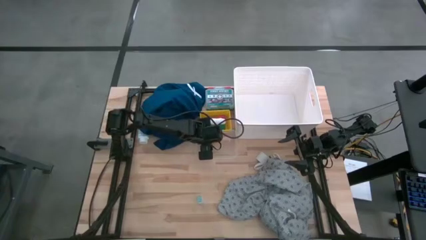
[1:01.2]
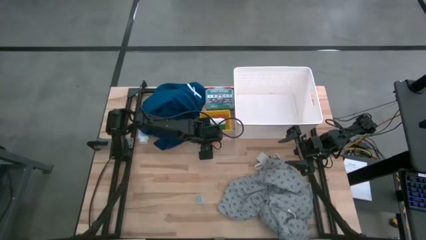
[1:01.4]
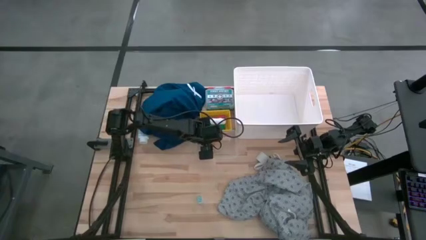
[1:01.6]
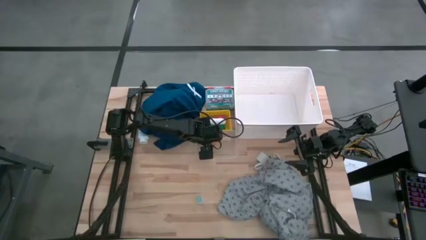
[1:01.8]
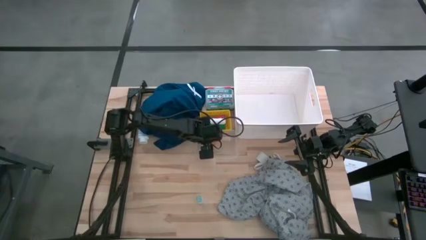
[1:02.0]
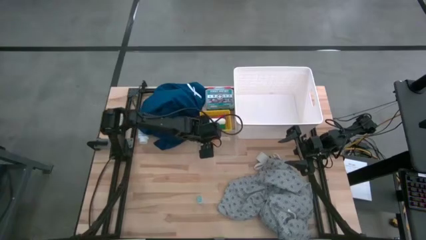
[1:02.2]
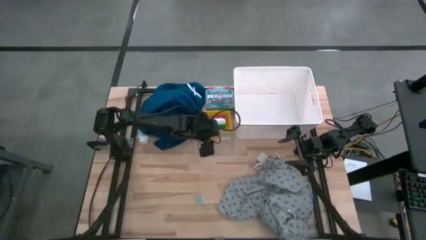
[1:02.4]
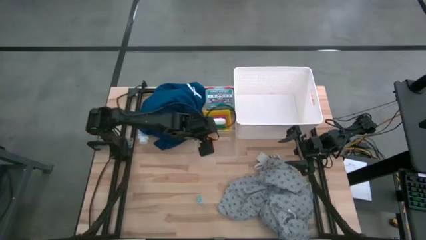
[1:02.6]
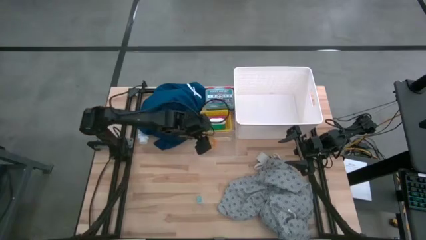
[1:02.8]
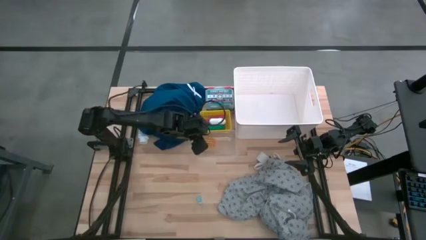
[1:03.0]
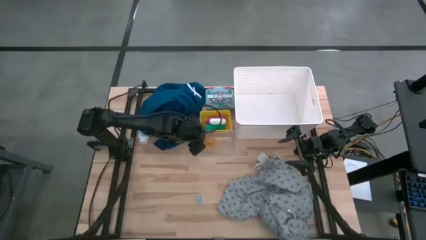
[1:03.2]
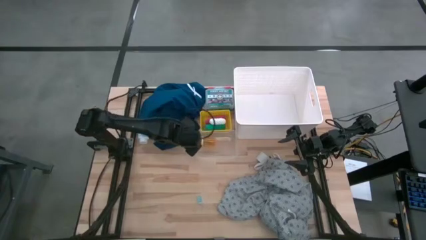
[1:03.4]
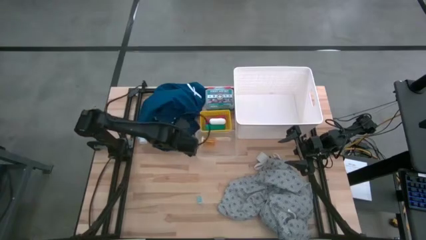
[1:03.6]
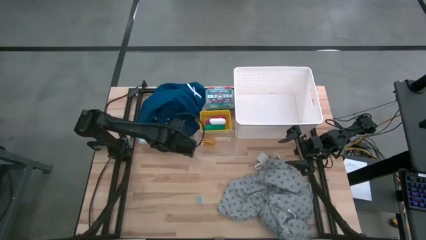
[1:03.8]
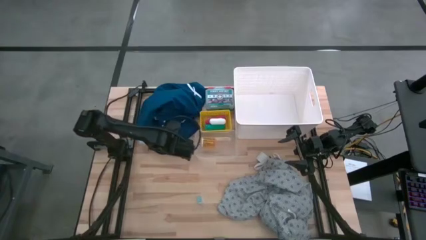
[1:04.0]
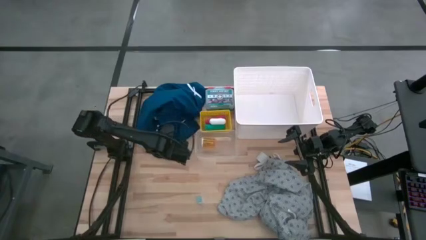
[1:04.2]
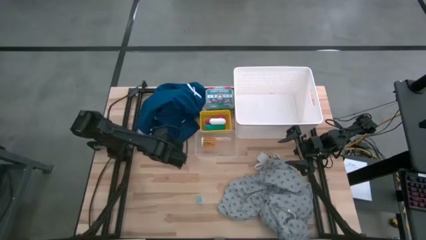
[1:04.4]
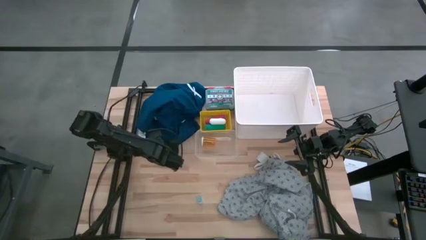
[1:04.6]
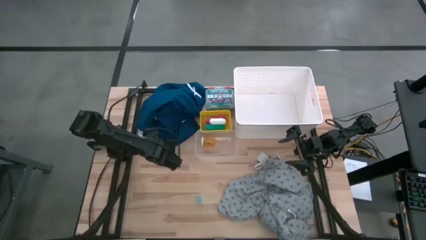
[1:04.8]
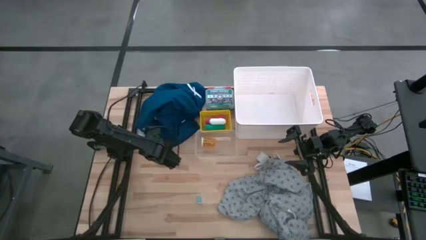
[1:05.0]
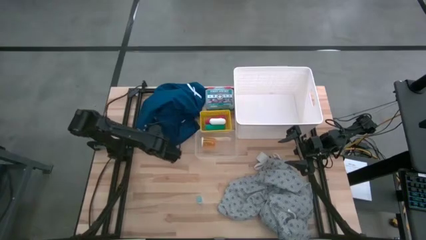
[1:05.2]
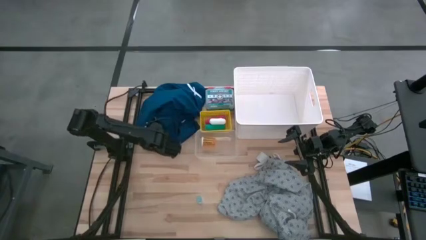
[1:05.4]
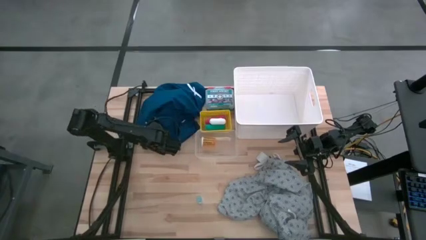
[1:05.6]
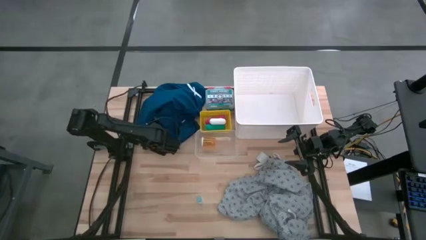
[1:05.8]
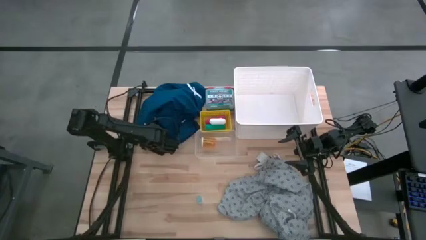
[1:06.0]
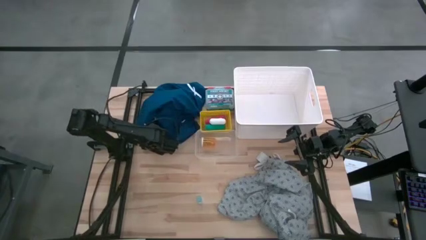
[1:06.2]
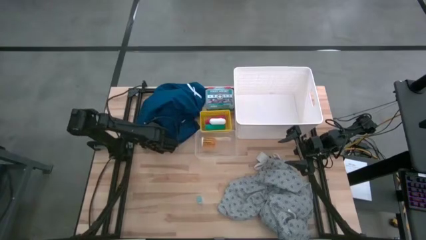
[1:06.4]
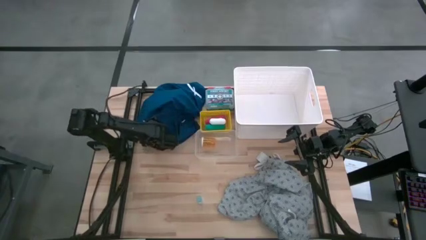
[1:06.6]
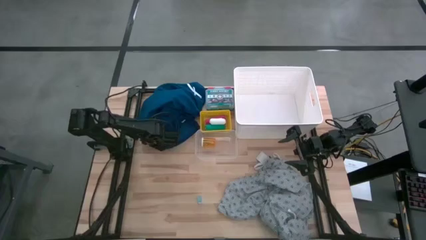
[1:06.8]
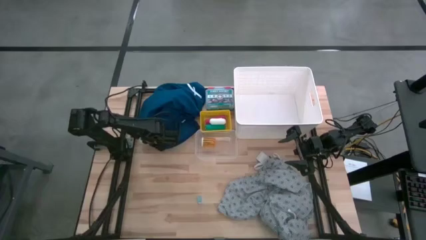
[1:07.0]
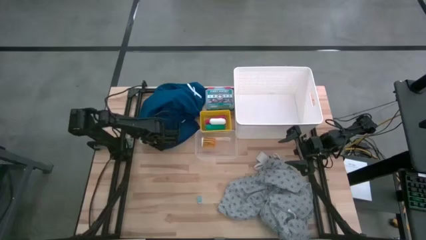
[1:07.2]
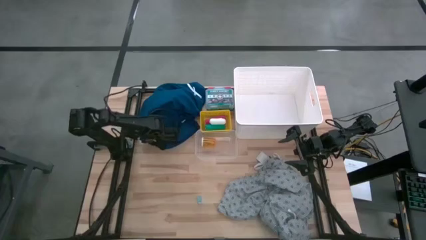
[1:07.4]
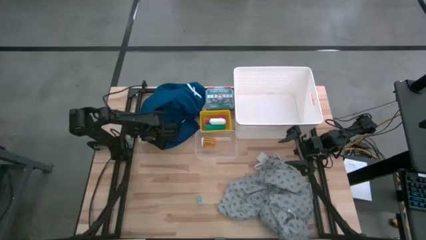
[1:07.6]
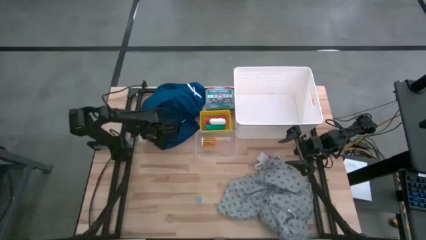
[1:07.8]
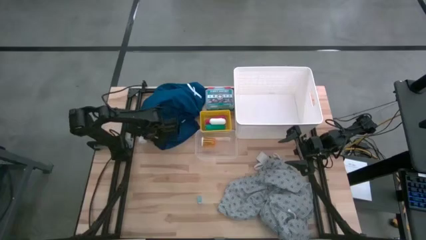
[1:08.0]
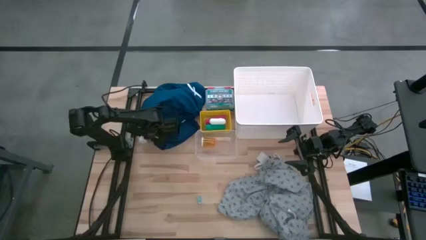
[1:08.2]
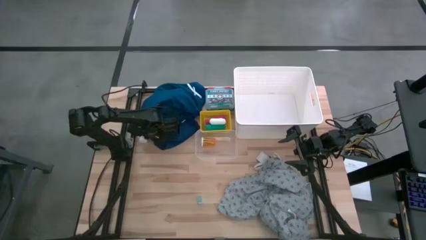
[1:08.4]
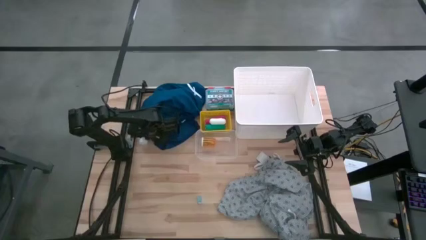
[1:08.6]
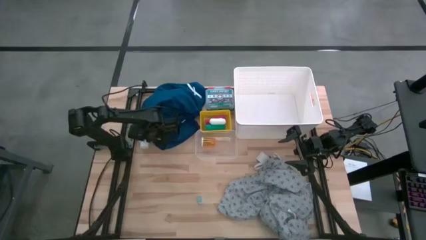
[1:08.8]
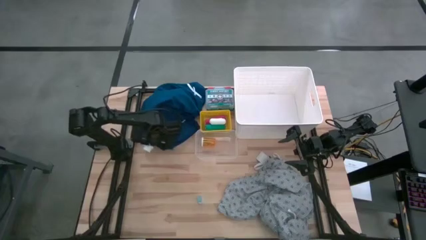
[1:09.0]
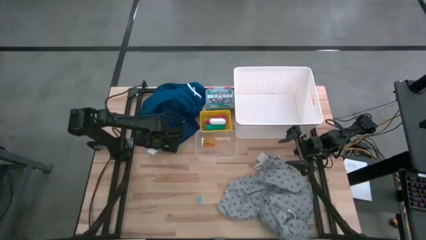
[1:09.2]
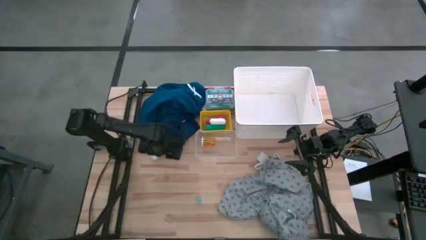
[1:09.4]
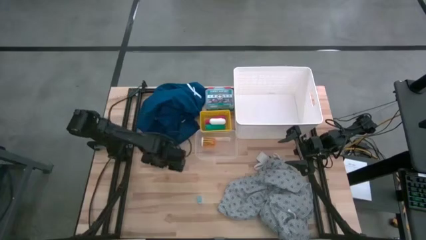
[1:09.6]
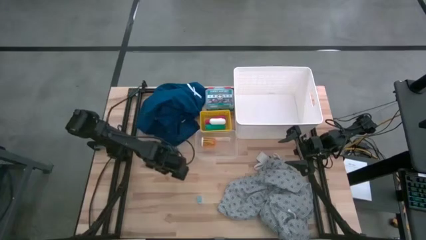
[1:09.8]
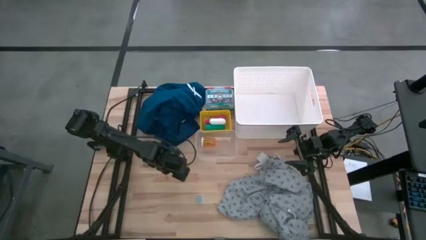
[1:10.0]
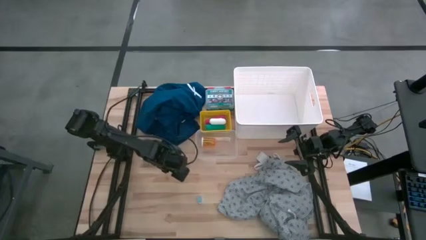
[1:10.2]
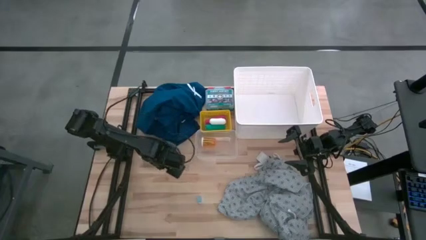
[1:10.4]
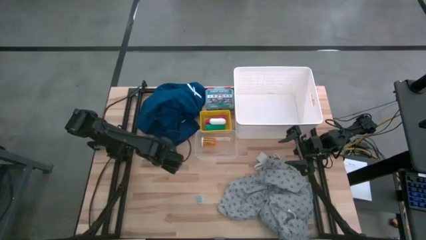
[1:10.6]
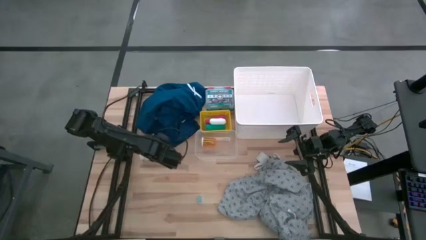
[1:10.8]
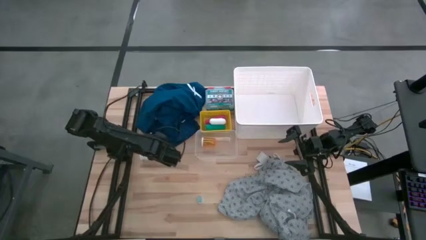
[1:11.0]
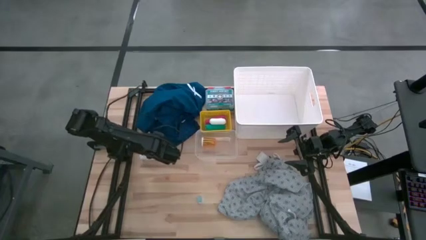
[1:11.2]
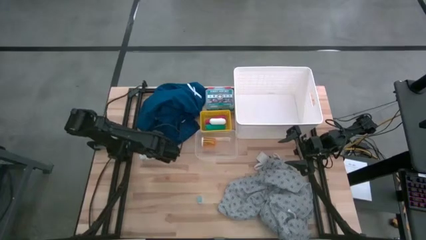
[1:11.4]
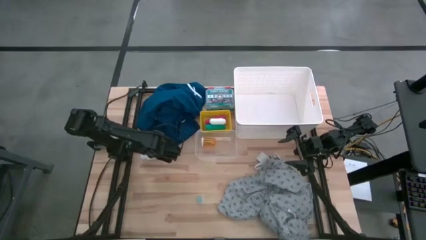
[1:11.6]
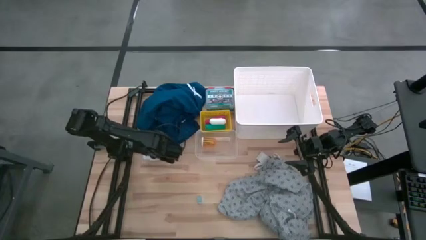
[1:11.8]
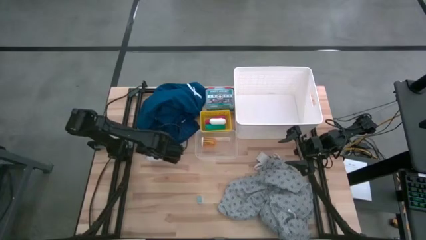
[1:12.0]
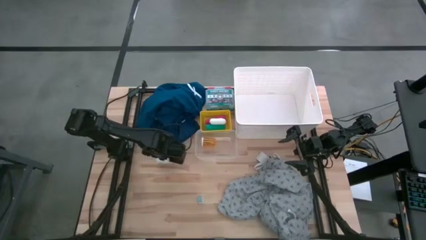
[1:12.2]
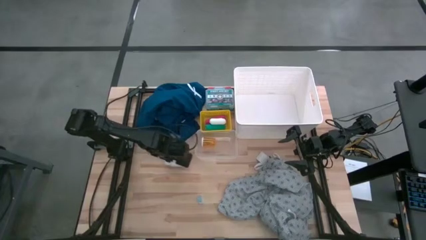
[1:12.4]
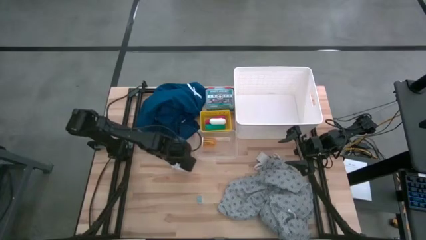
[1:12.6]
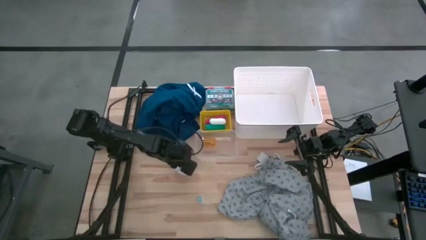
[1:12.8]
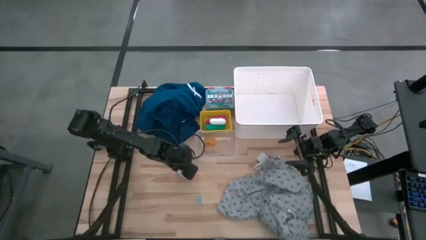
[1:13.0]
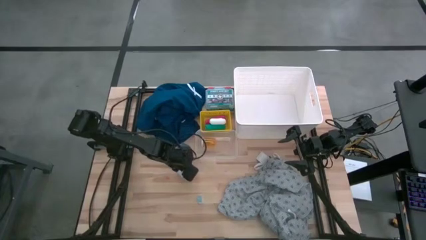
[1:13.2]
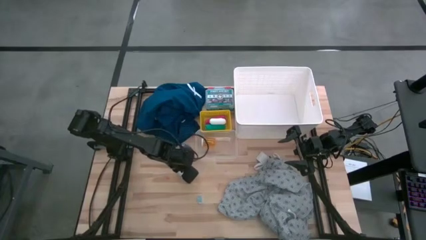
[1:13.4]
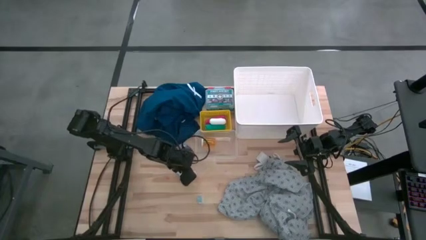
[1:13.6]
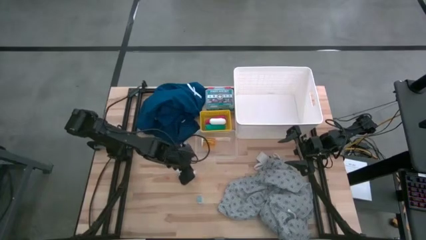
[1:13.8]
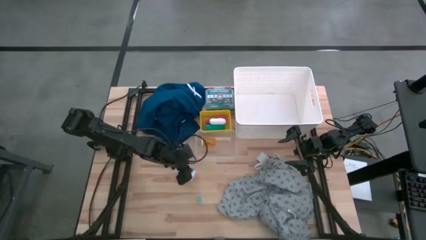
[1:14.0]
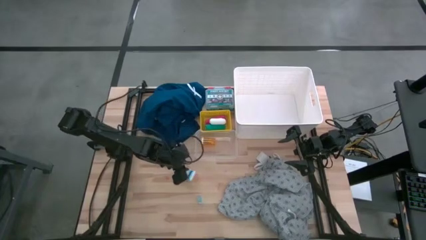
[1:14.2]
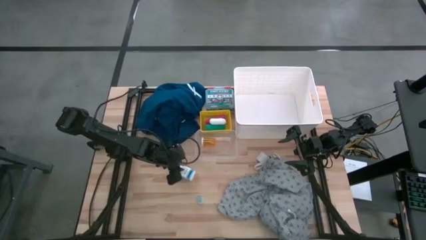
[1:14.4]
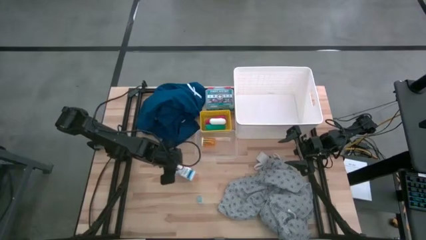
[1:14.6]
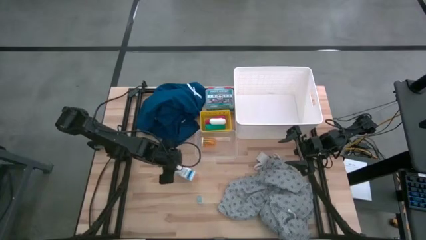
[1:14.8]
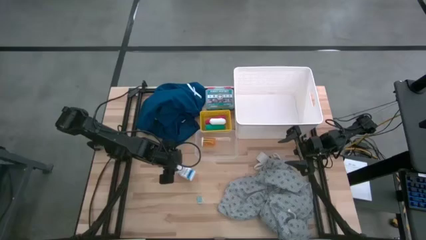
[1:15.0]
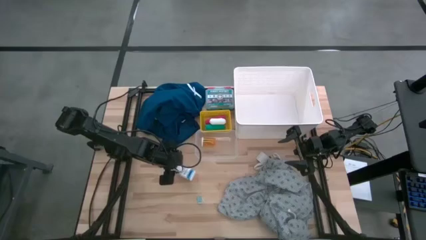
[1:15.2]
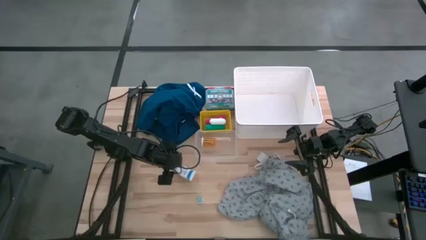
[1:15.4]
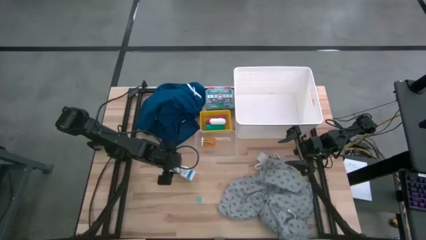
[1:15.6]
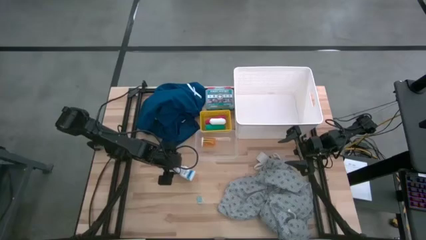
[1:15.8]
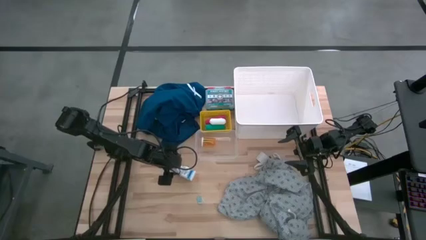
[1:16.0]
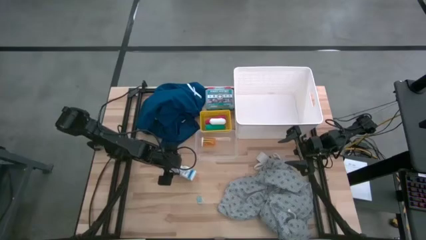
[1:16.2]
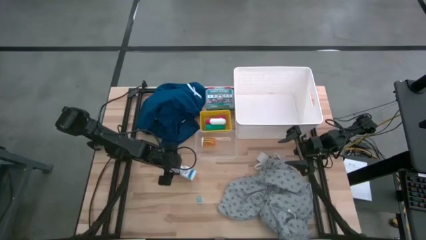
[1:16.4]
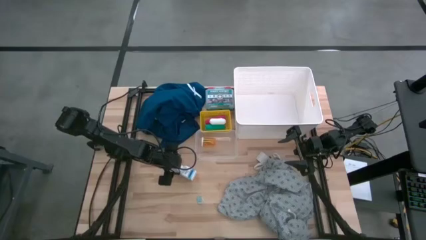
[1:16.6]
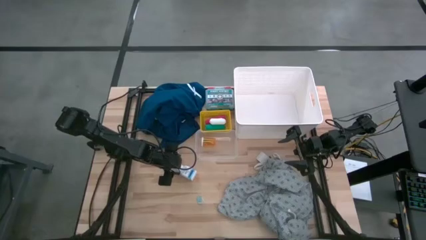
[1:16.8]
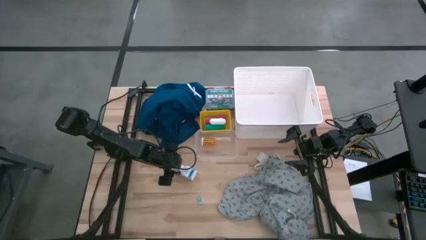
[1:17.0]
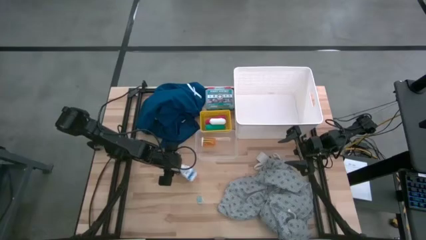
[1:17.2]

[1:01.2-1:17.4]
Task: Pick & Place Medicine items
Put the white medicine bottle into the transparent bin
